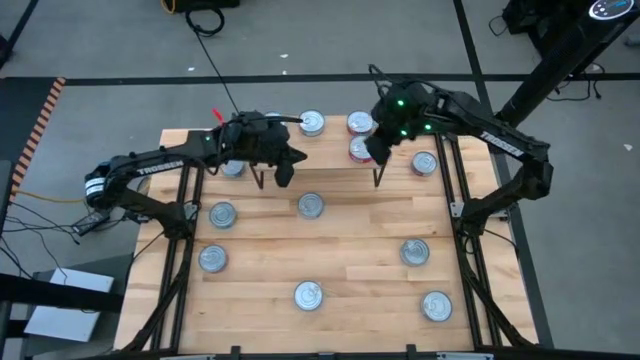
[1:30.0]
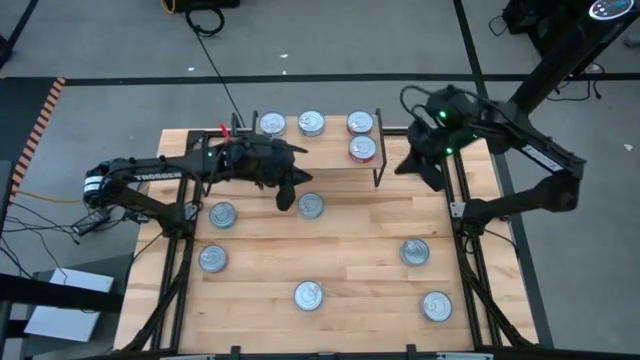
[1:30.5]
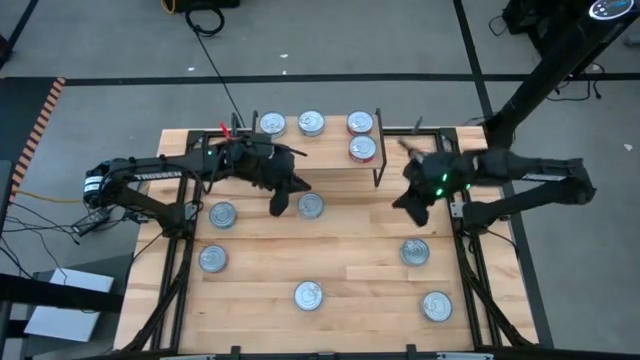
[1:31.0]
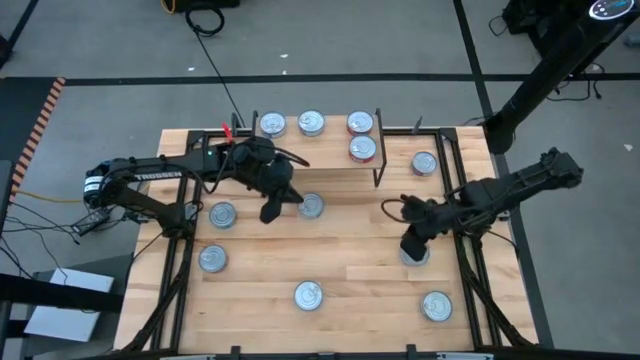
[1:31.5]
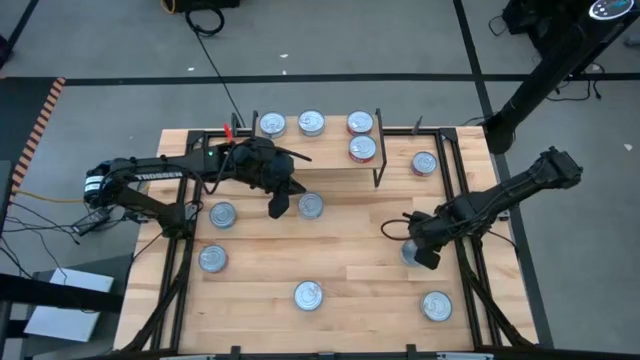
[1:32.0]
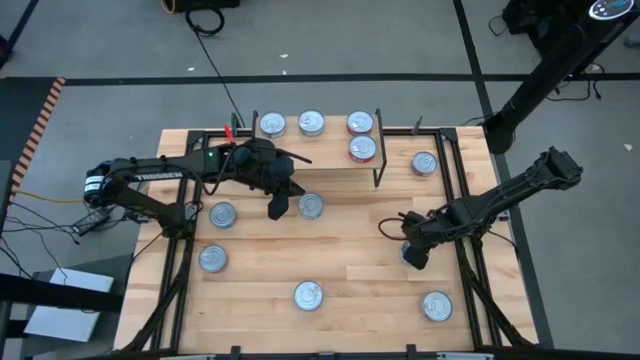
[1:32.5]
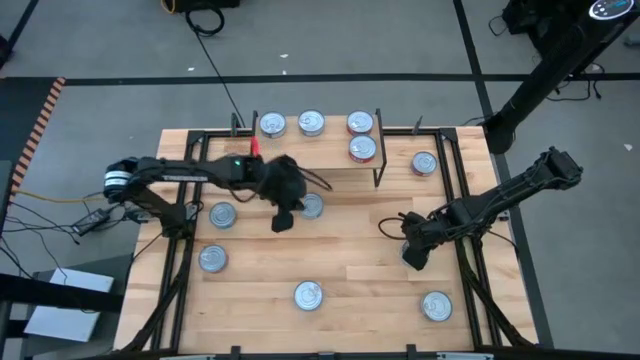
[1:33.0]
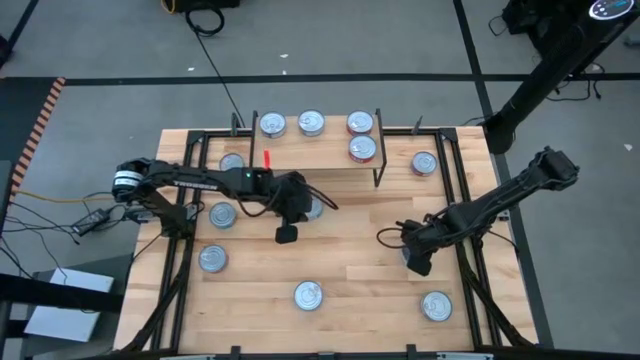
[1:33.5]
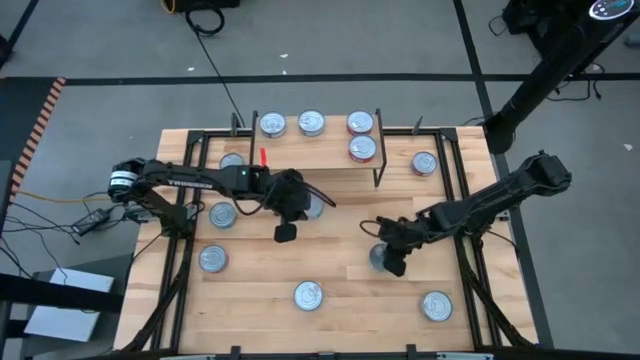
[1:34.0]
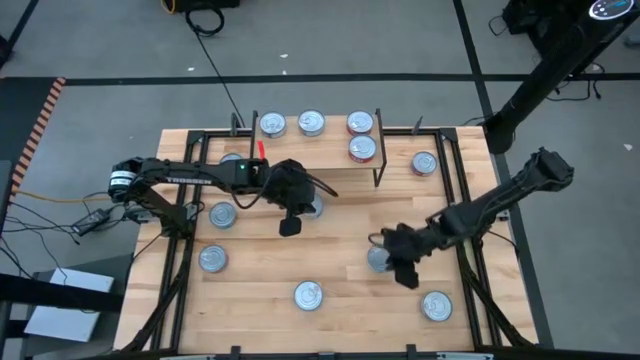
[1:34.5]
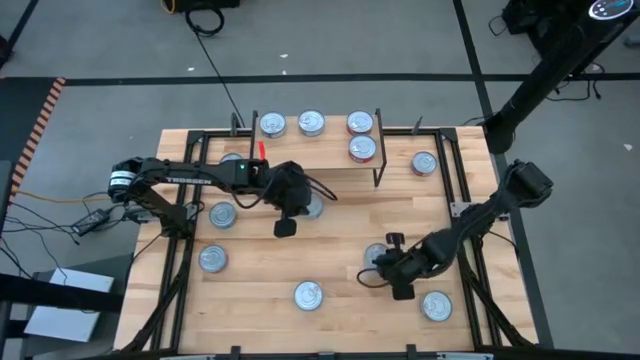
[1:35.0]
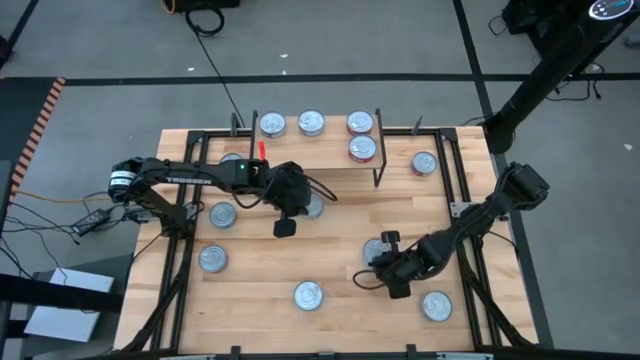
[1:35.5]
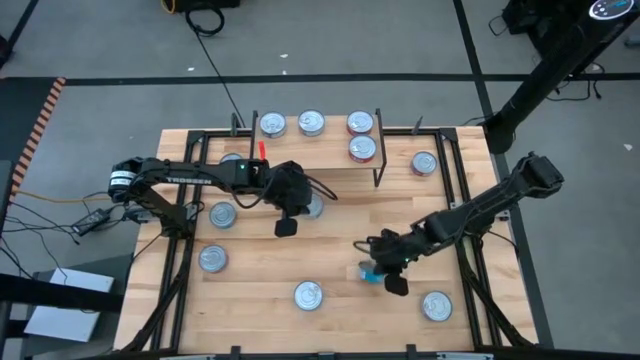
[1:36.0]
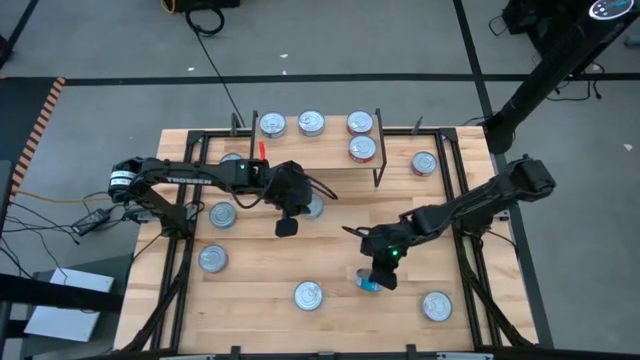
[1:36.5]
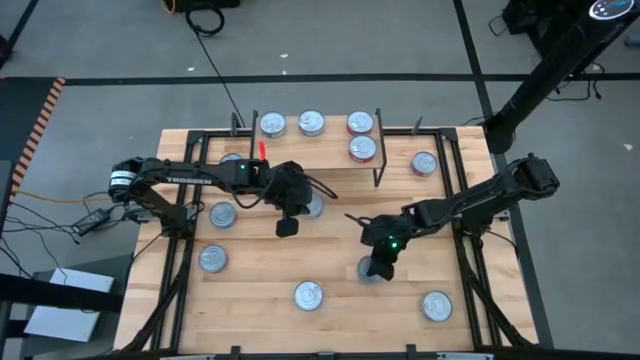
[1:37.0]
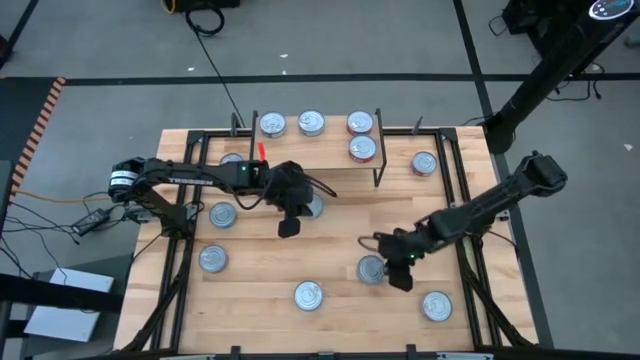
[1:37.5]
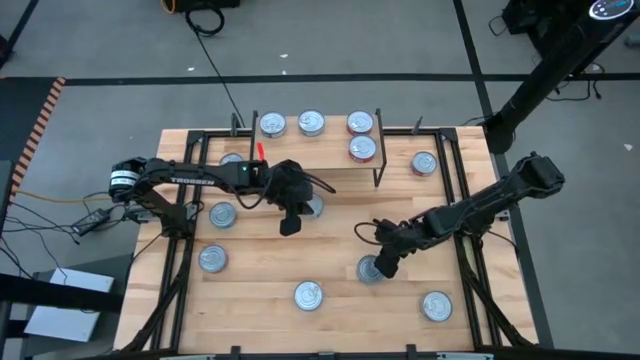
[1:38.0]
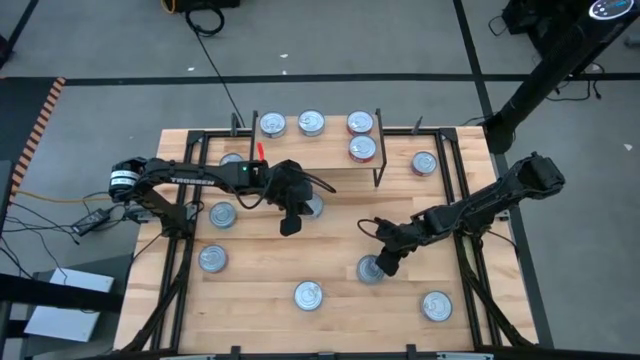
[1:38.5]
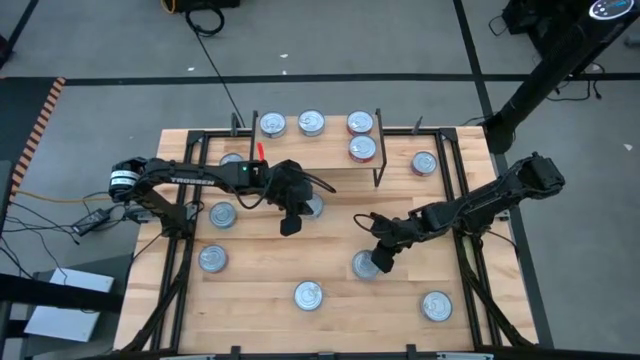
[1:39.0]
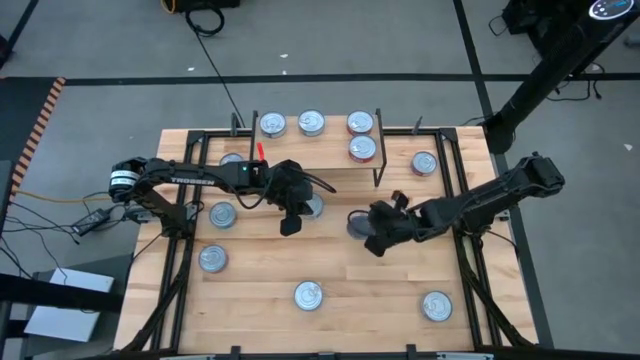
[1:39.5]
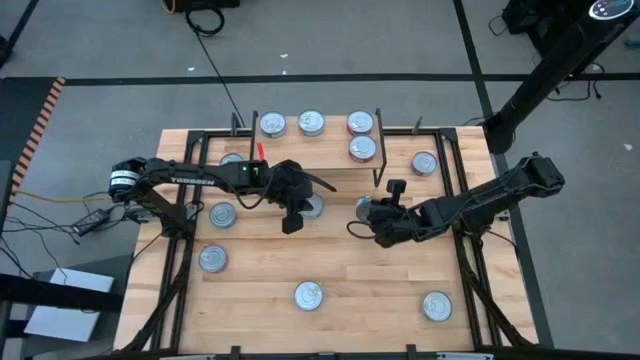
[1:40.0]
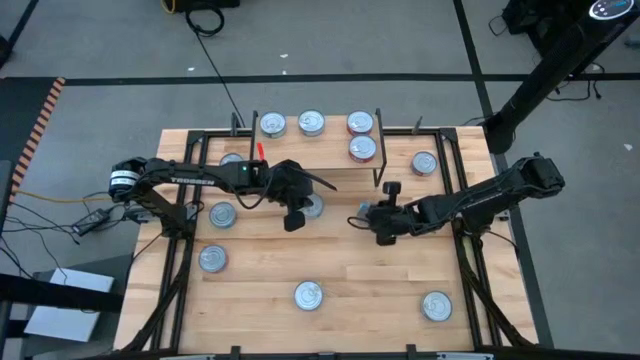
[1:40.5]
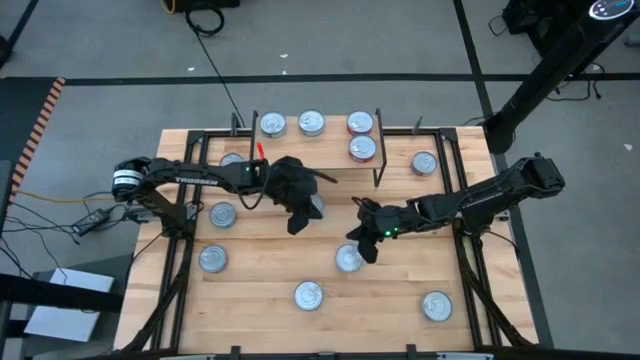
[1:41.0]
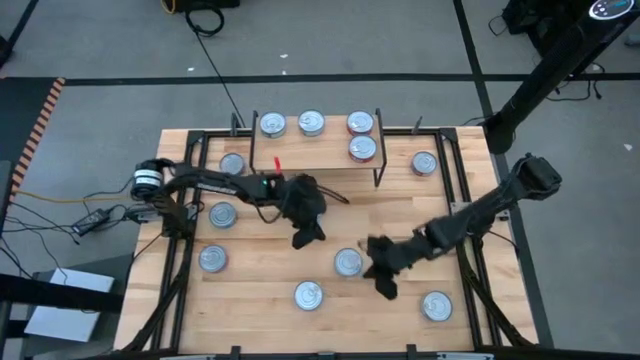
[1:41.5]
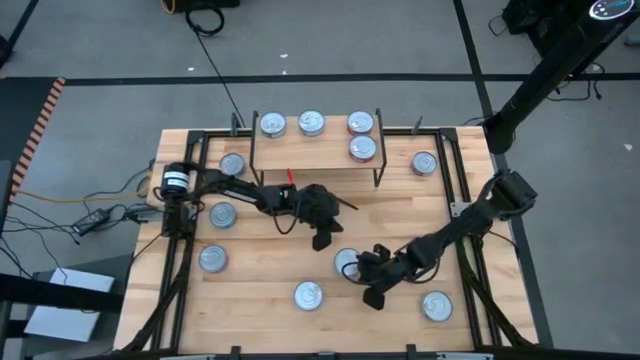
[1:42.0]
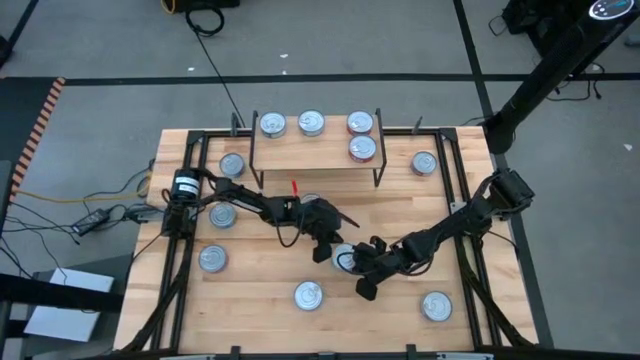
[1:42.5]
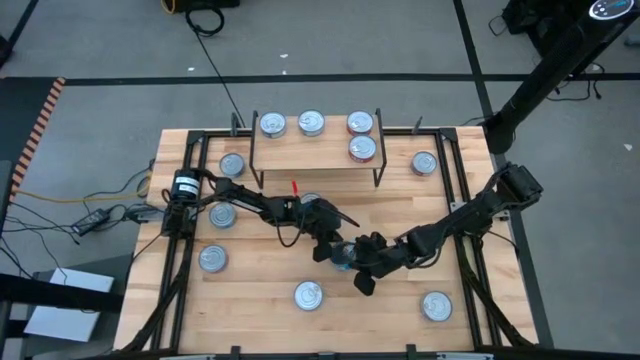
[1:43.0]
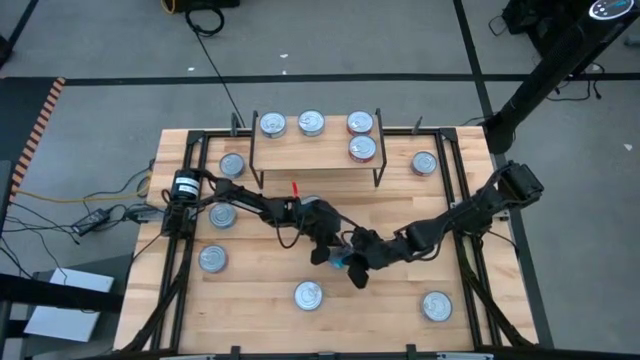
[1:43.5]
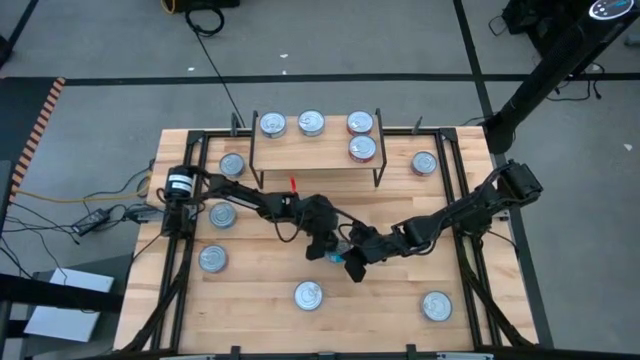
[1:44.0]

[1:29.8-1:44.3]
Task: Stack canned seafood by type on shelf
Put the yellow-blue tuna can on the shelf

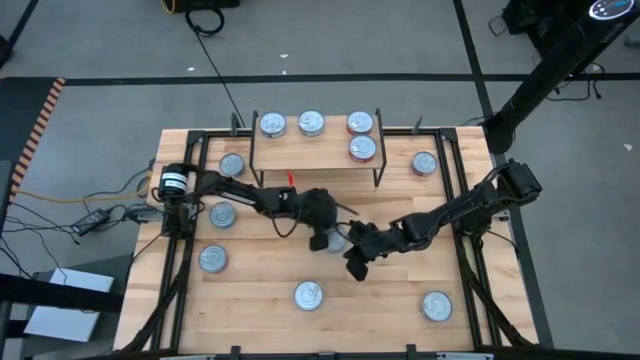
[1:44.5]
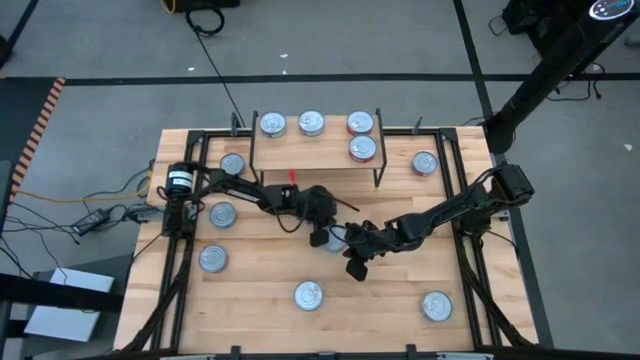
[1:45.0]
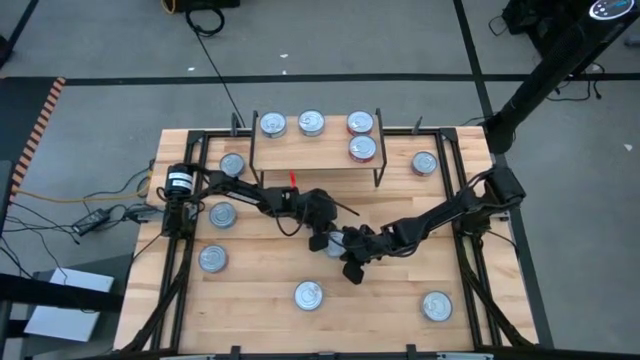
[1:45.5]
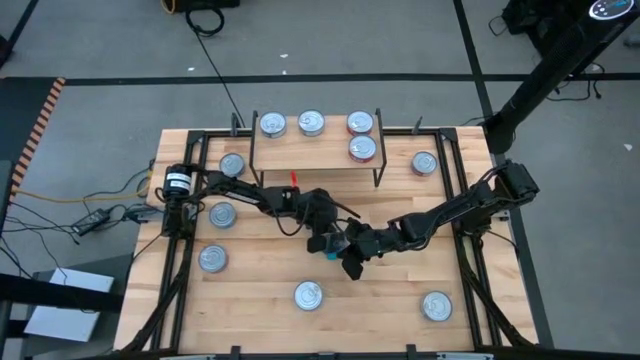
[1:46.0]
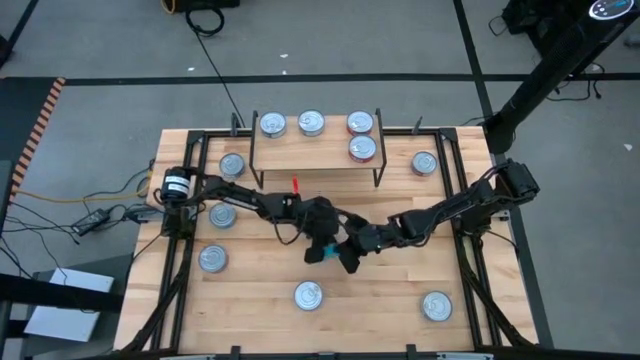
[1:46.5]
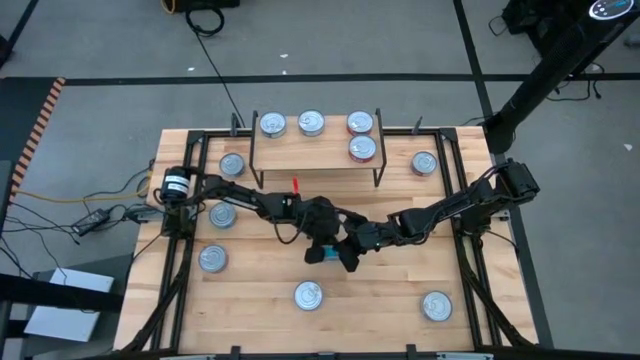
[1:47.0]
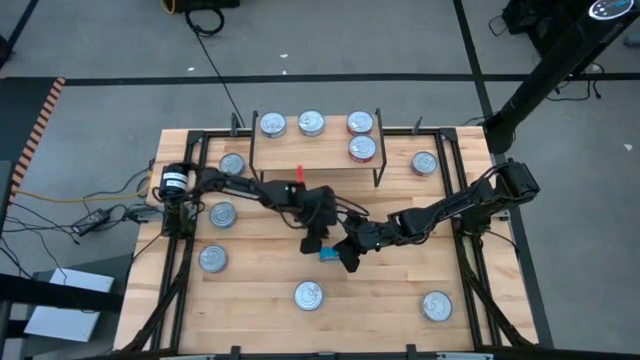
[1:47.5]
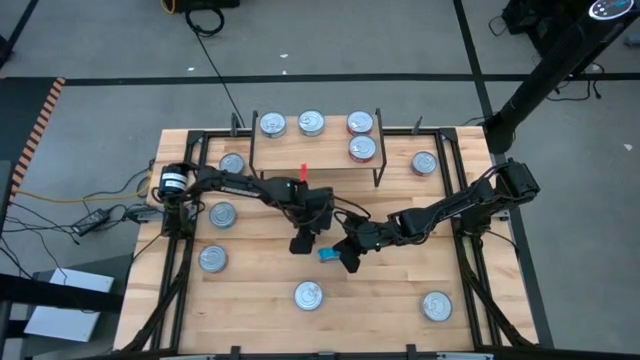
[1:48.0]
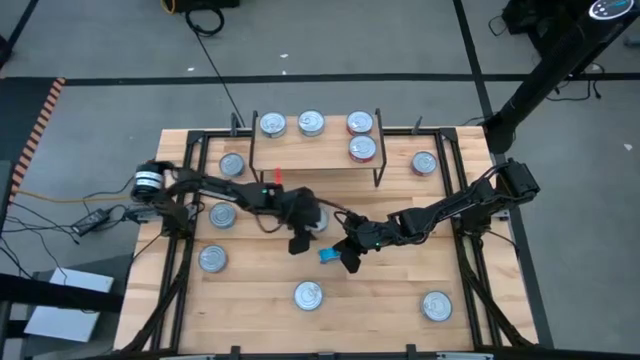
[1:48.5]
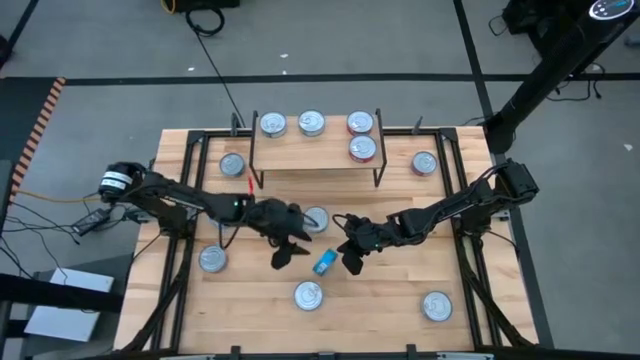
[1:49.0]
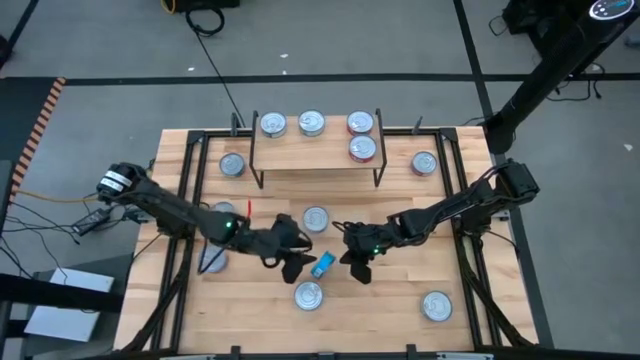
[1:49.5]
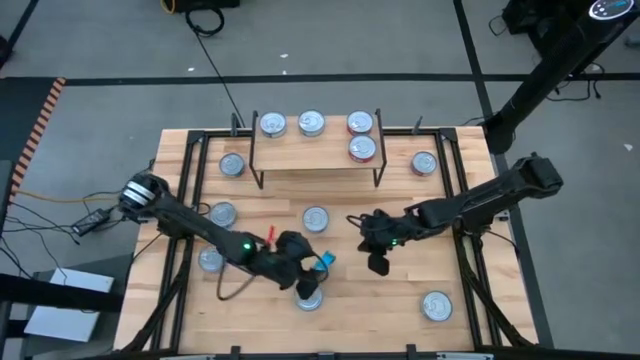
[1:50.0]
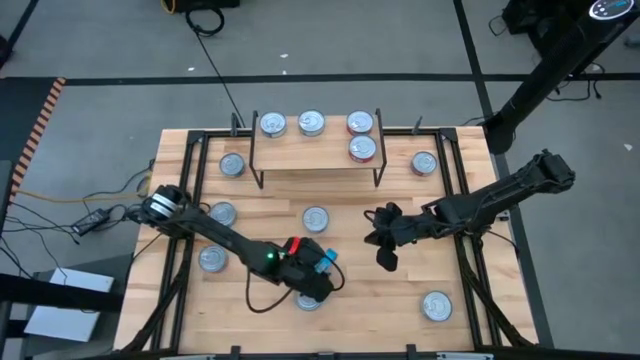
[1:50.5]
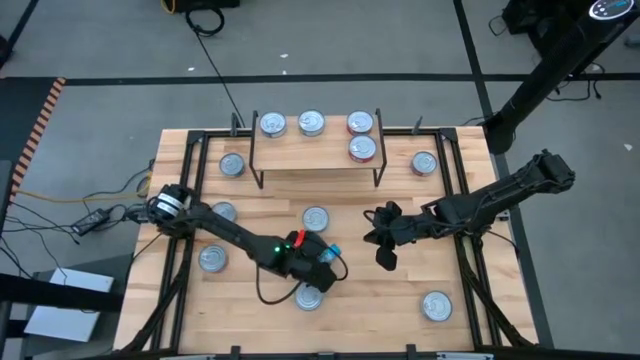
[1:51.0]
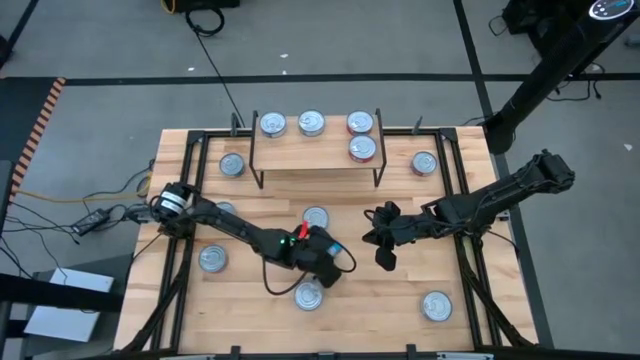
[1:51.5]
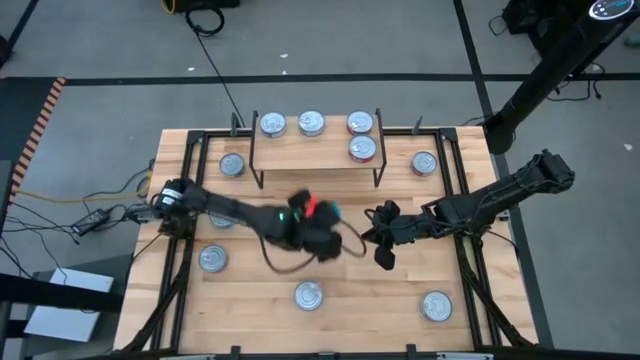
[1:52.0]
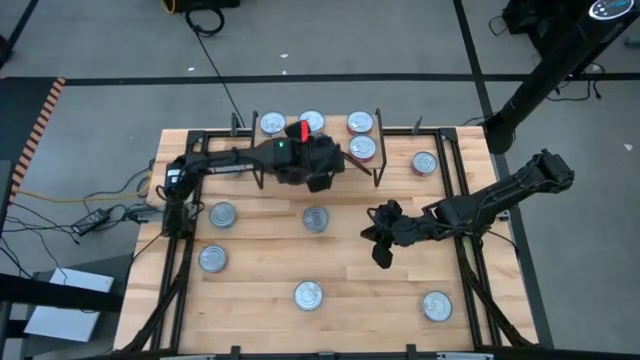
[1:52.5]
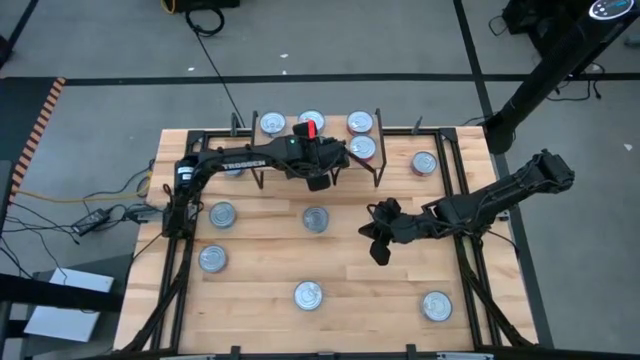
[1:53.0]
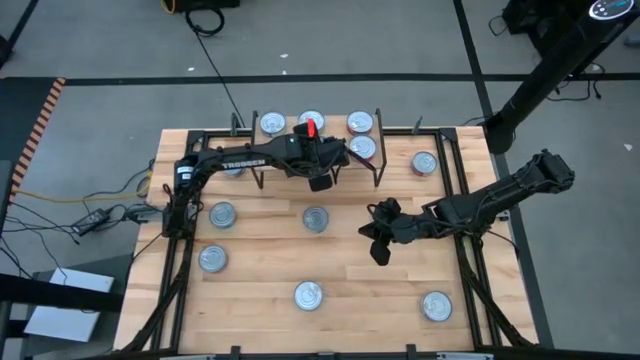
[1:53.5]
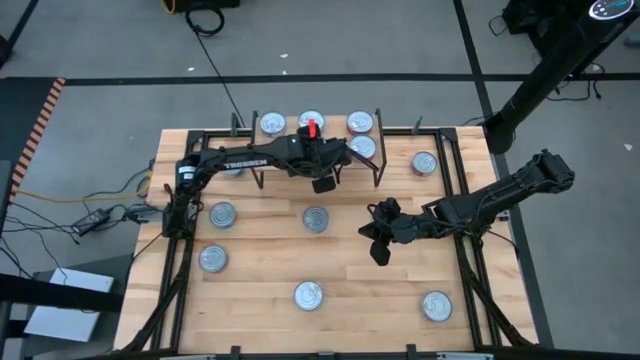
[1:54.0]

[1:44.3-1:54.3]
Put the yellow-blue tuna can on the shelf
